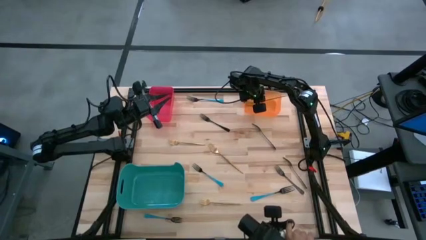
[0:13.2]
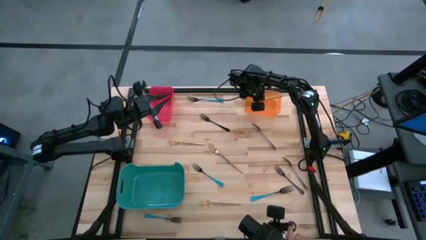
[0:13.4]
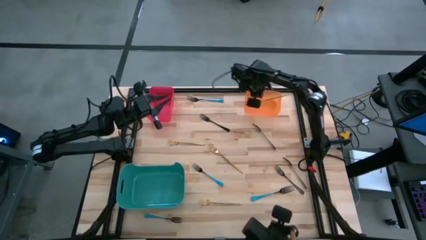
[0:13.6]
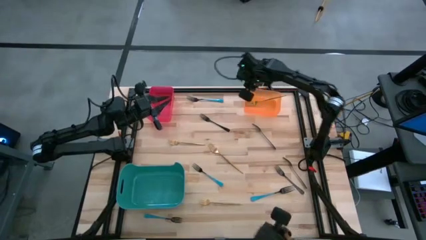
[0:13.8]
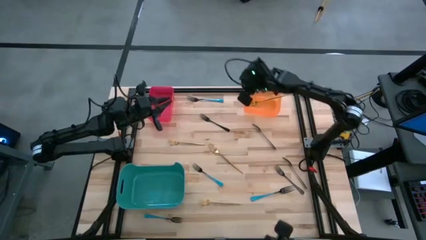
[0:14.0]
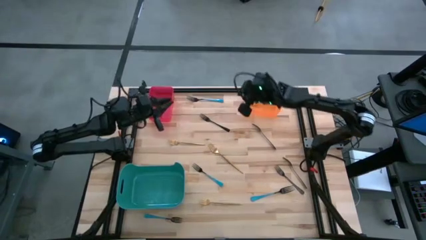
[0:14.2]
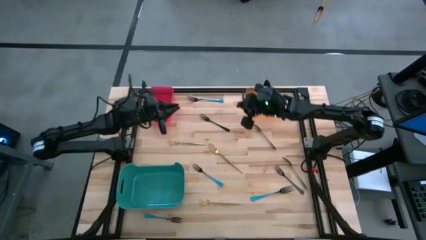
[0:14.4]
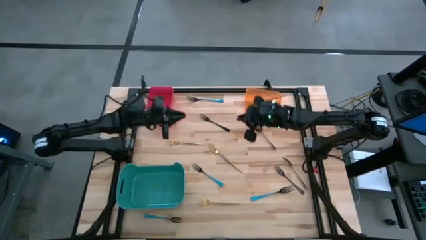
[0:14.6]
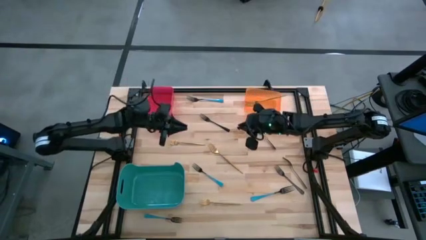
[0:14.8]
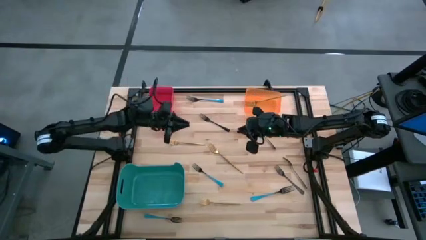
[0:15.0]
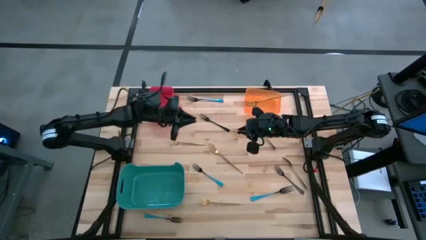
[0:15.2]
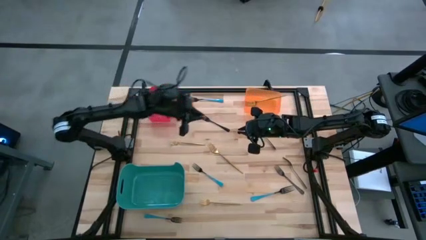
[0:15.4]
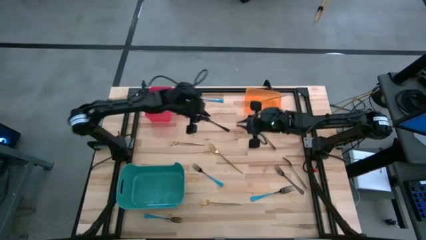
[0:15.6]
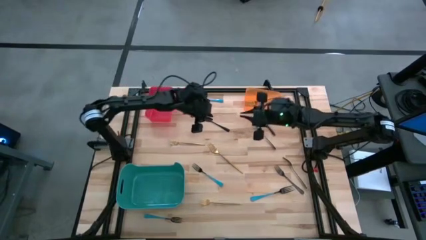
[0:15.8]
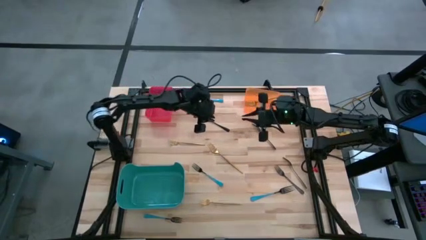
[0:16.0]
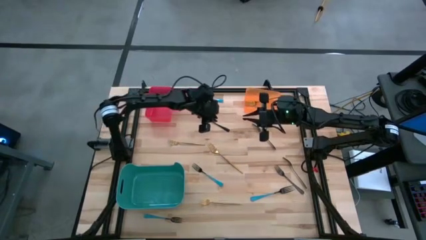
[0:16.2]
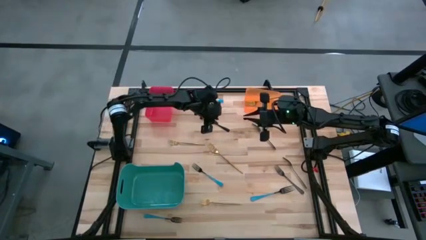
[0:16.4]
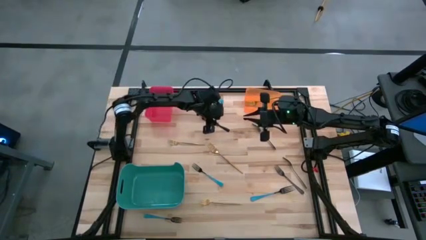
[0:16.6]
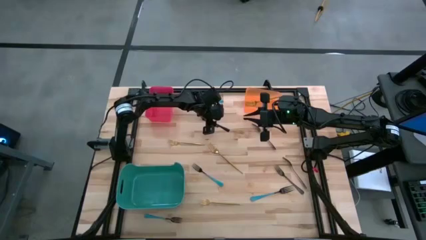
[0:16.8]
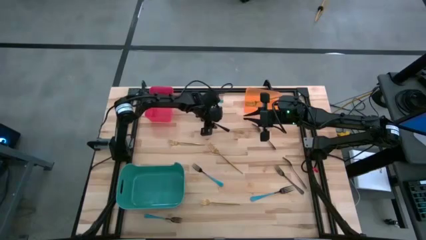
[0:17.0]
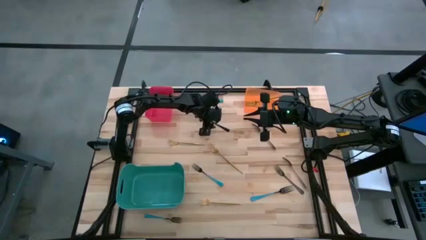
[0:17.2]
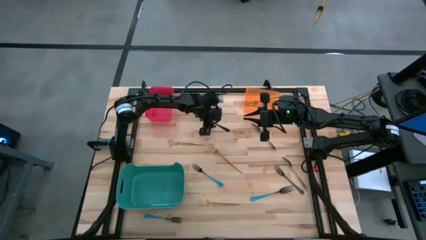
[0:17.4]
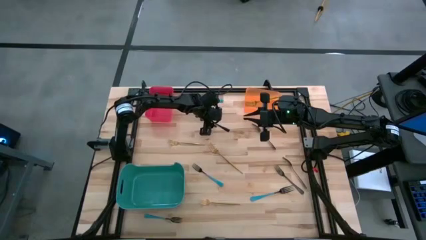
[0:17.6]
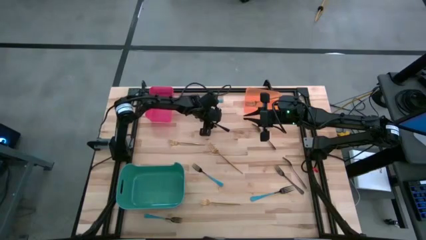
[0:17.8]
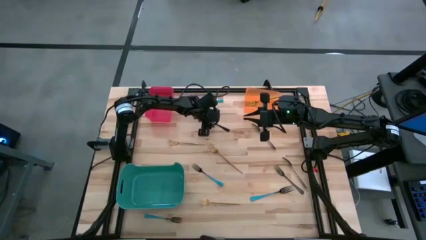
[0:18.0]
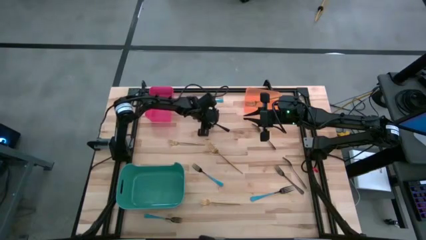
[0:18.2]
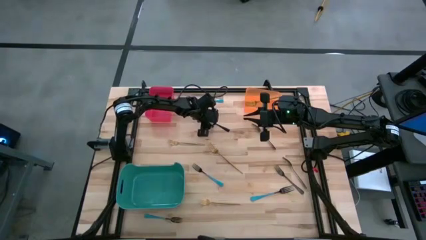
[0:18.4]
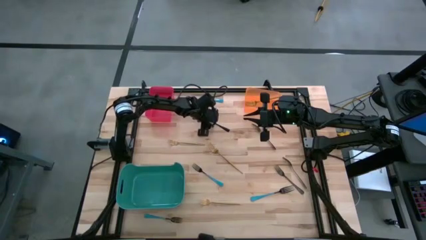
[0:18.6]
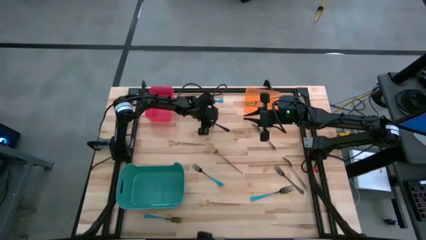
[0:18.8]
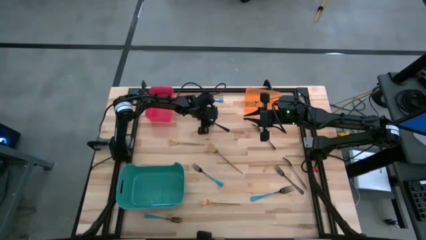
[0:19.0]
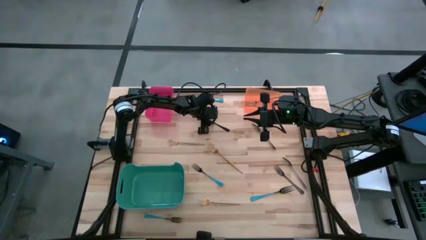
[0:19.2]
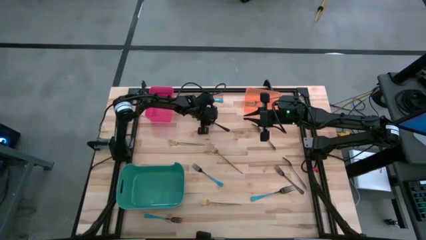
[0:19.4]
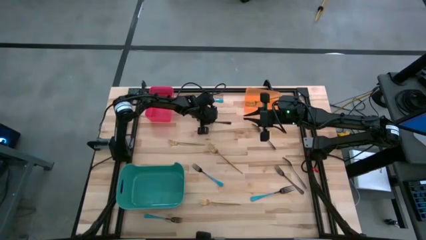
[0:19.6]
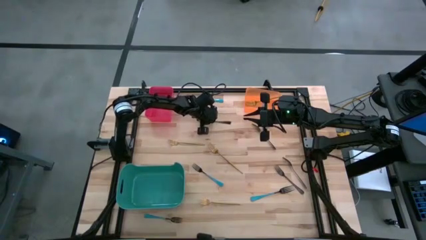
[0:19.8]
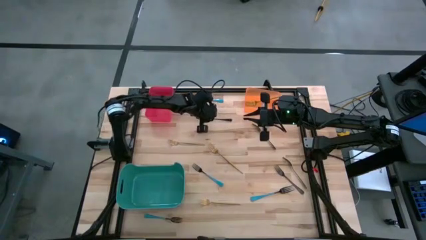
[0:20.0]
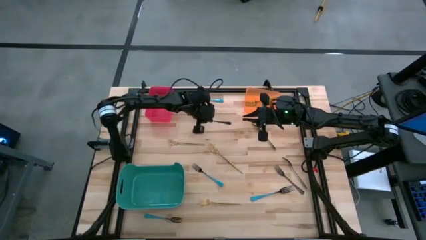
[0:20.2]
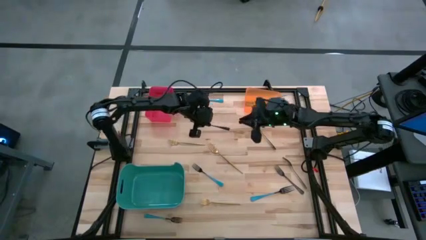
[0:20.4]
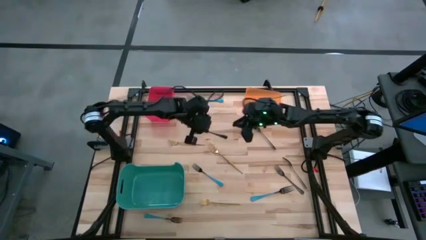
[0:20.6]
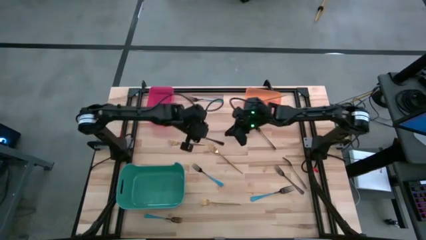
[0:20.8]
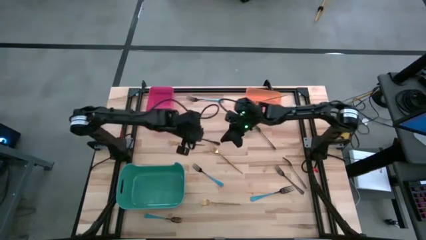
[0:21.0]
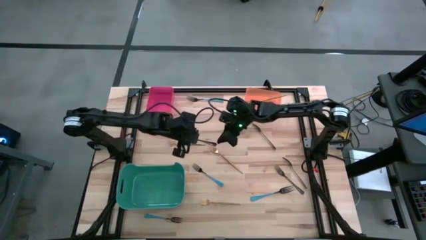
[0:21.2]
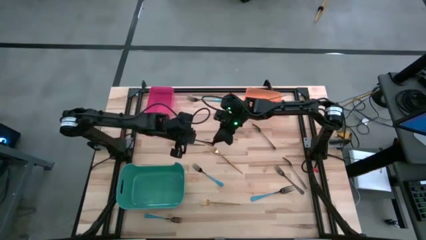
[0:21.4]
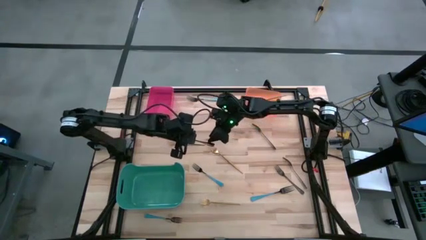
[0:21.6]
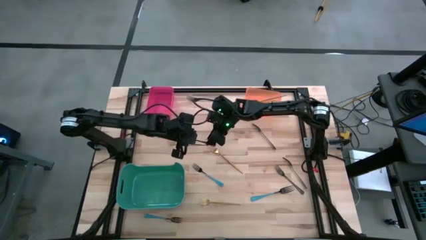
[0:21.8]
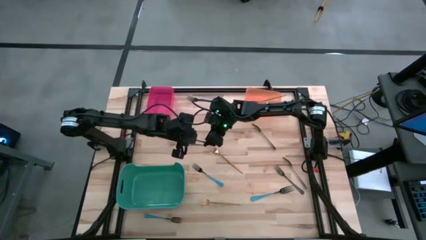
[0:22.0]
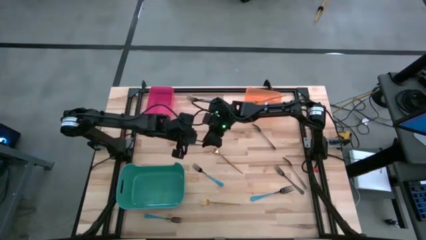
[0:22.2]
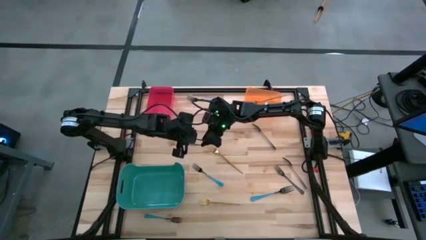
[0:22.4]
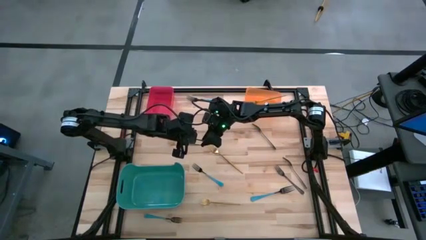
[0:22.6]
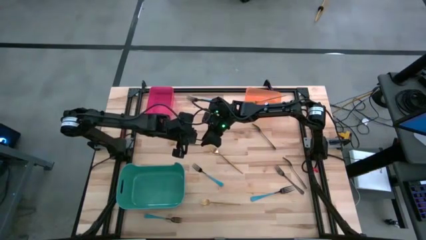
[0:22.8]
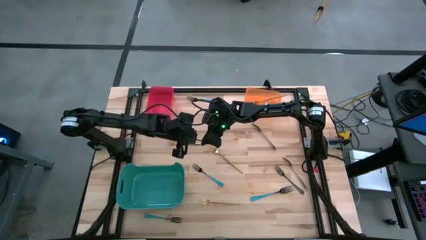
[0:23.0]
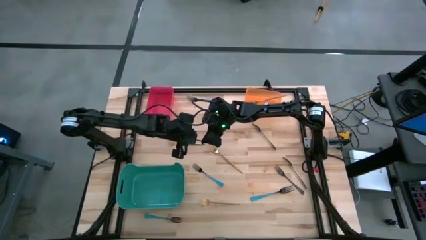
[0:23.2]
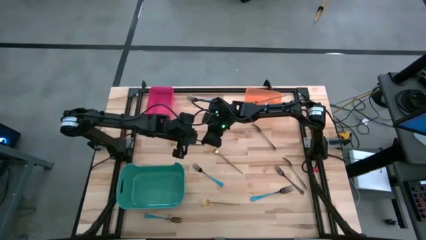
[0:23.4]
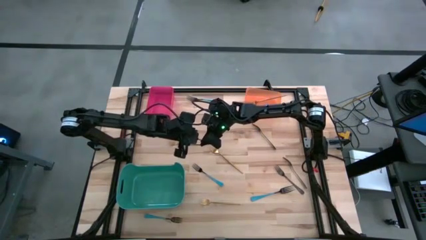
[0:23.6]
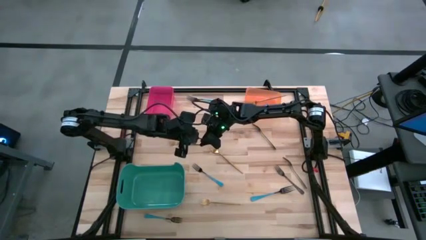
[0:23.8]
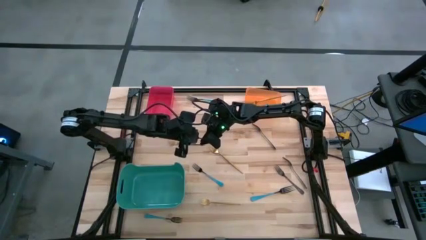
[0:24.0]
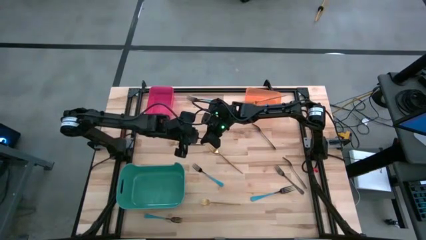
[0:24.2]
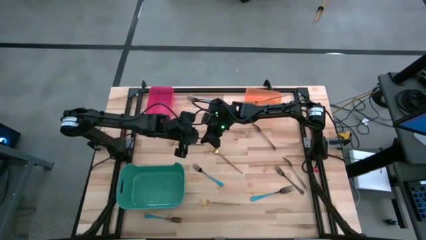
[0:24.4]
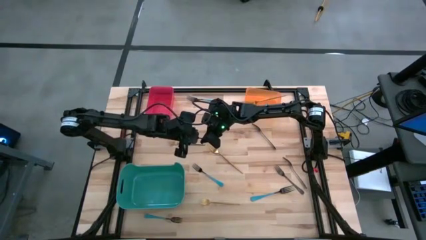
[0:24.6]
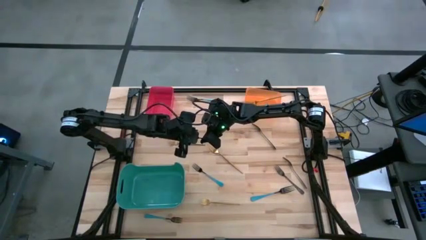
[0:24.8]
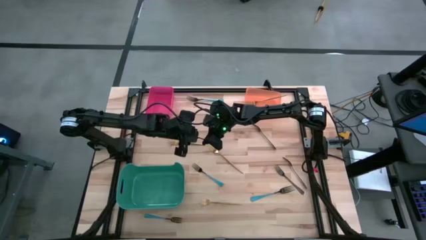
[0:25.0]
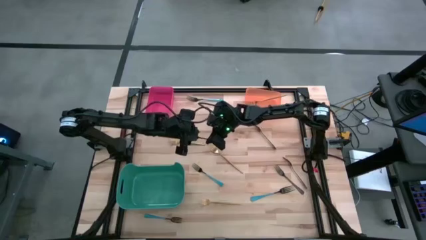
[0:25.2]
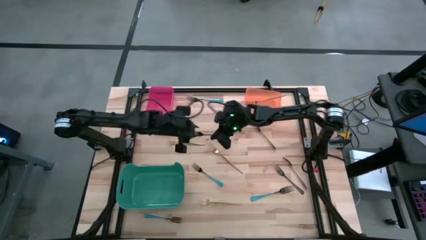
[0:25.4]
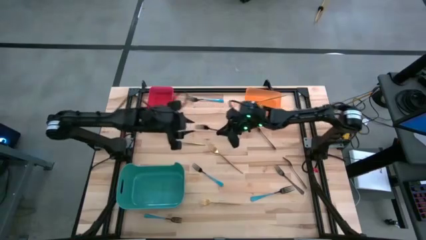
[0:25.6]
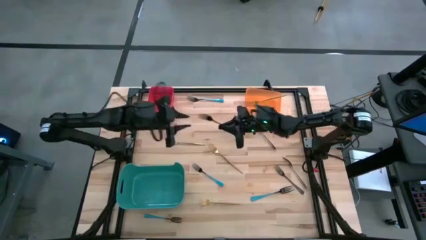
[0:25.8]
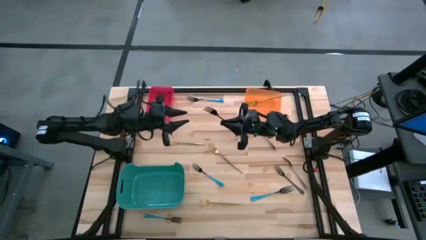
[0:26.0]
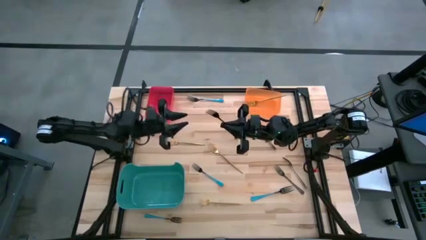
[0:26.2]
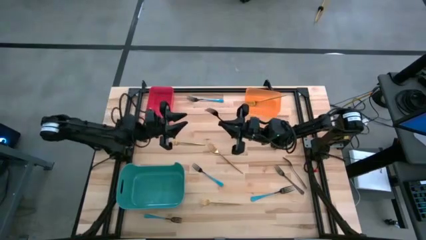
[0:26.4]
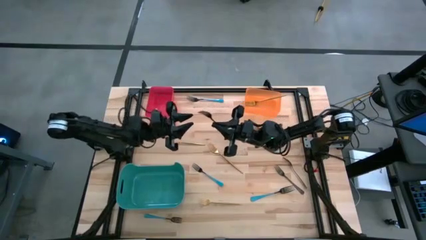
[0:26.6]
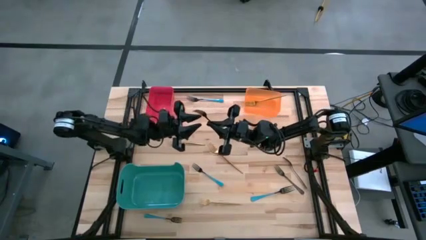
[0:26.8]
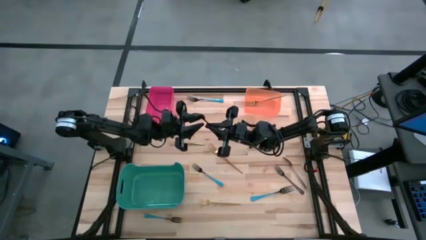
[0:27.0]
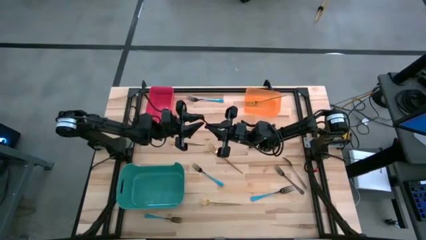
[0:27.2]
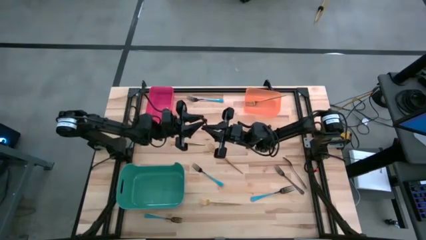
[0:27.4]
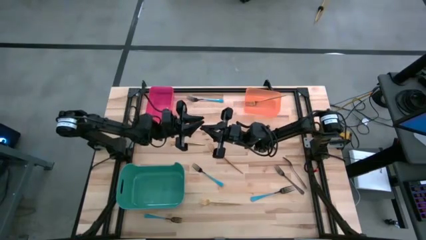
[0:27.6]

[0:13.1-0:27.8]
Task: Sort silverware by color (type)
Put the black fork into the red bin
